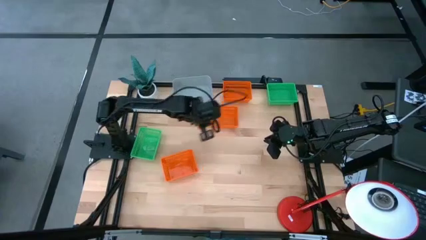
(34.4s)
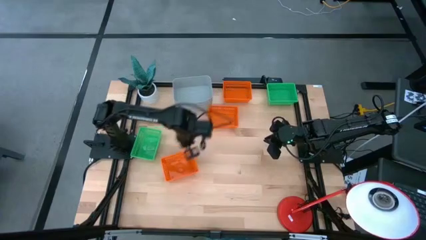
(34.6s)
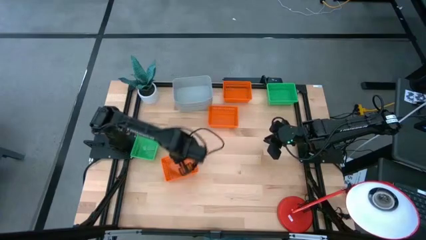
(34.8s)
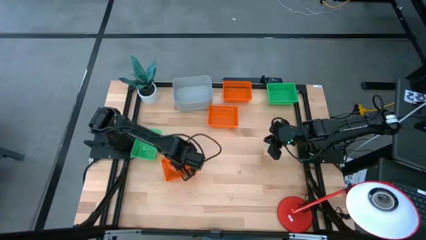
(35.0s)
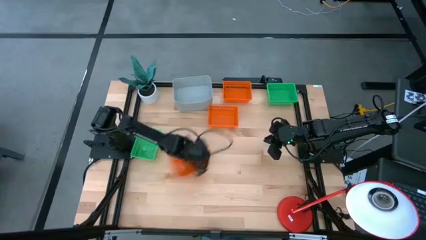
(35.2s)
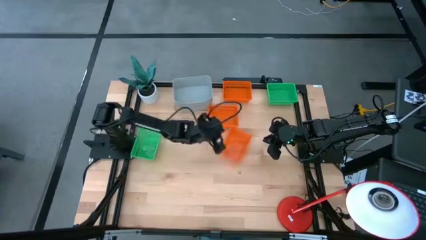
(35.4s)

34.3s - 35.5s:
Move the bottom orange bin to the center of the table

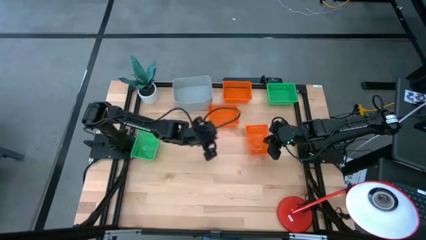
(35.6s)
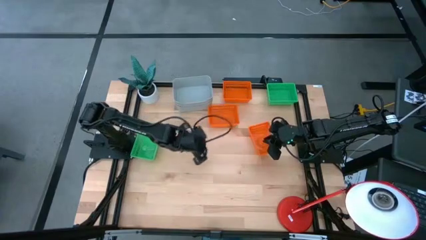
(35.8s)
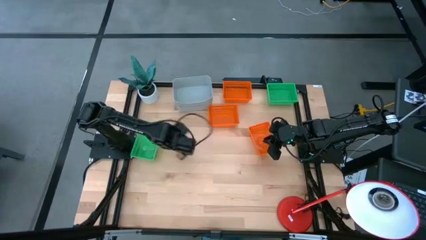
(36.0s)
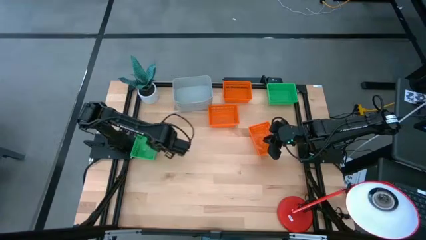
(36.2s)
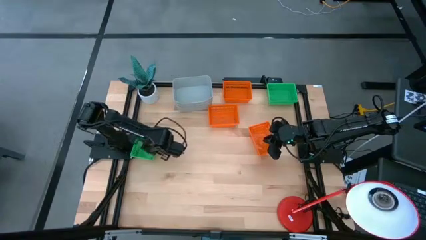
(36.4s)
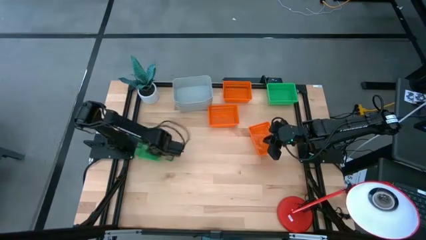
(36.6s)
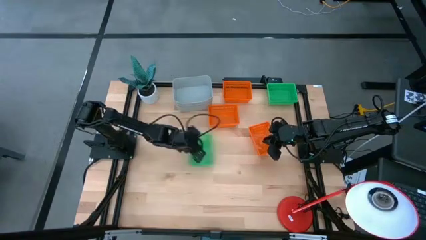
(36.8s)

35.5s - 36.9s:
Move the bottom green bin to the center of the table

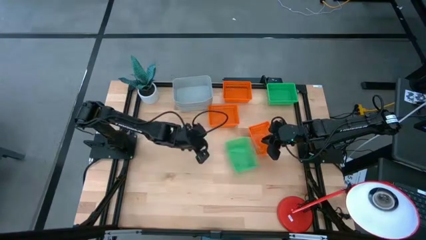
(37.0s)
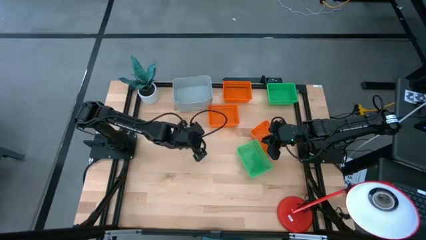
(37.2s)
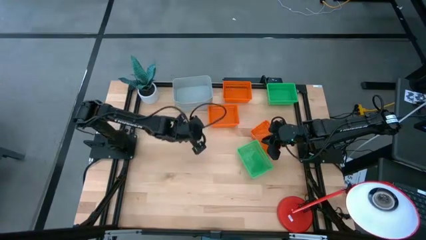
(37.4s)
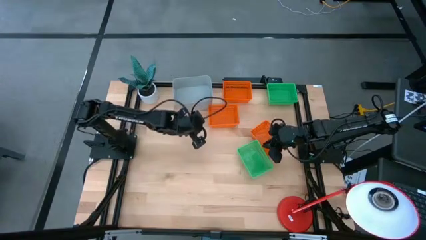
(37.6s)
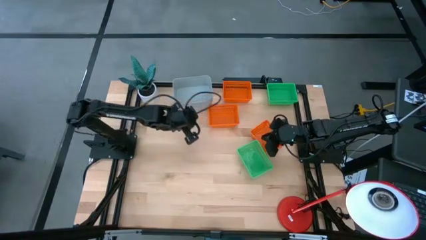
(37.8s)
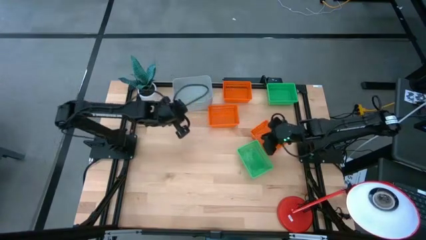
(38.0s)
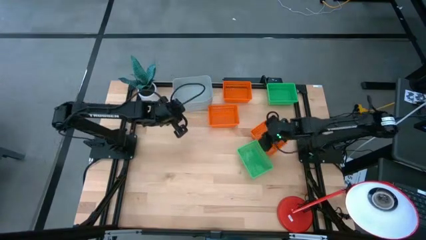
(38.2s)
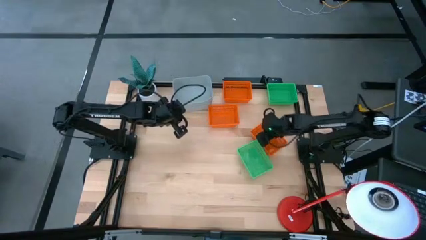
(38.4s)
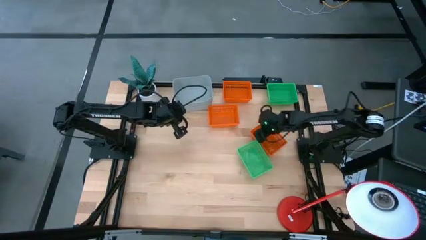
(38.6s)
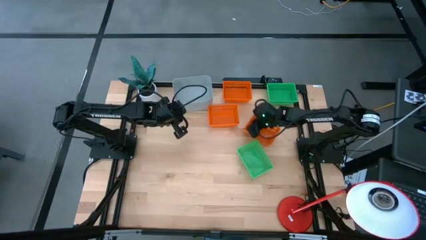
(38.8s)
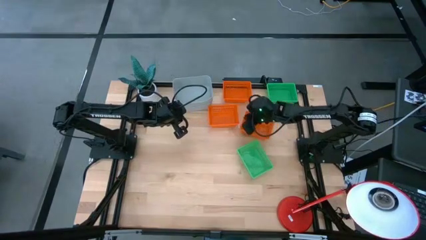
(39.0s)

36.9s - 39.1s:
Move the right orange bin to the center of the table

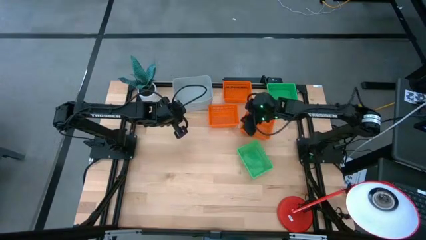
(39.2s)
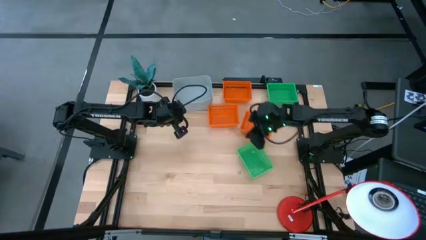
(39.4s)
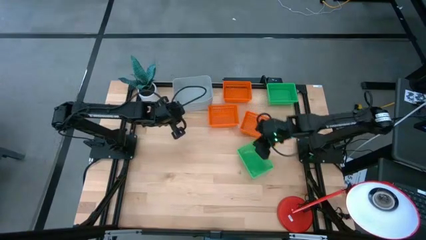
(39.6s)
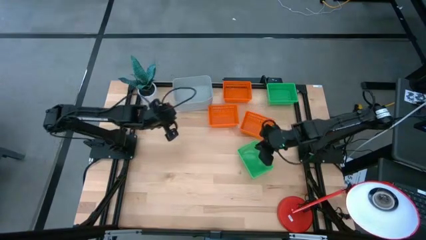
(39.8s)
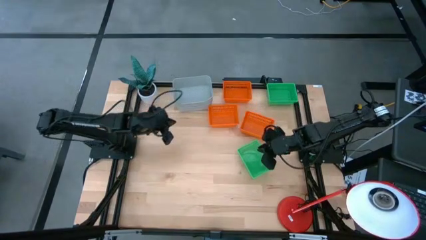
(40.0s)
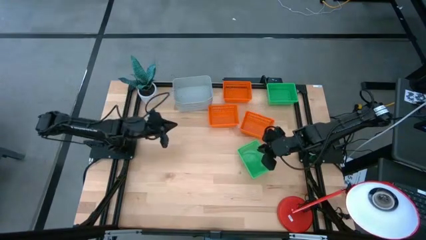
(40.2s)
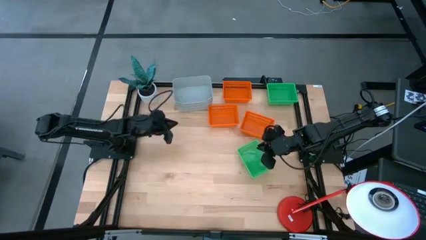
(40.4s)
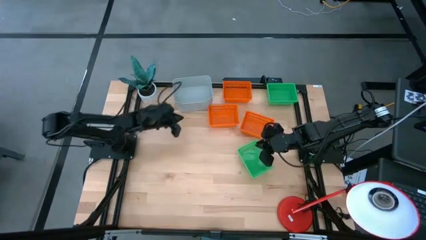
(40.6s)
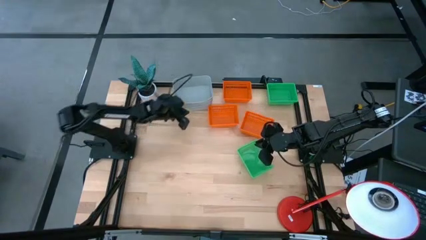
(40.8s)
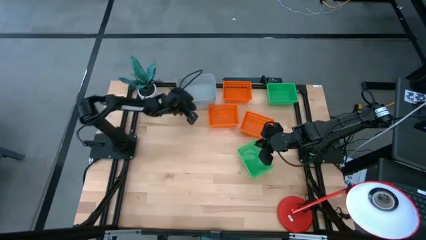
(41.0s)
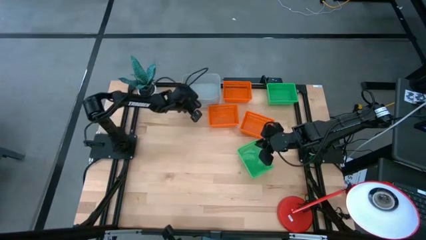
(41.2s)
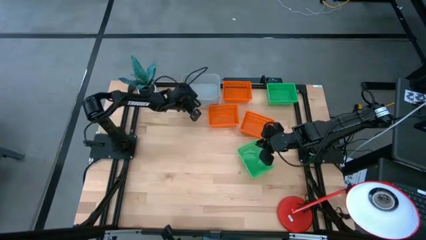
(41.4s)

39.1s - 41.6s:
Adjust the stacked gray bins

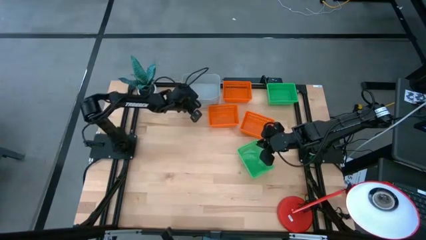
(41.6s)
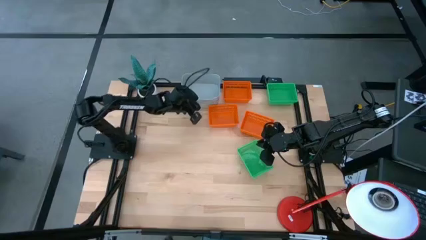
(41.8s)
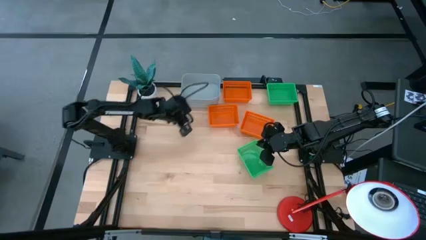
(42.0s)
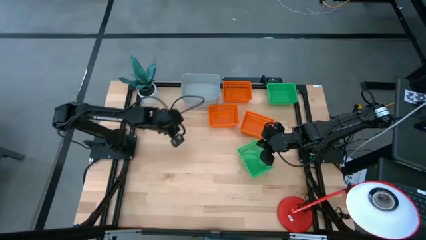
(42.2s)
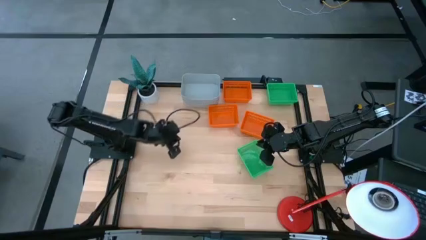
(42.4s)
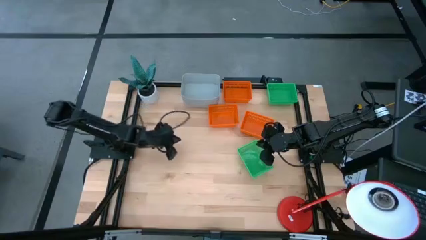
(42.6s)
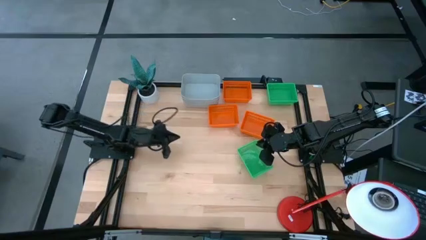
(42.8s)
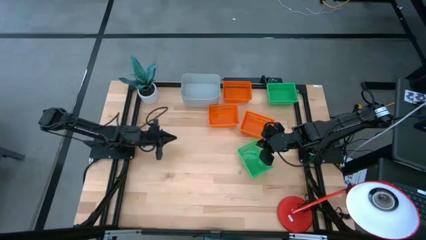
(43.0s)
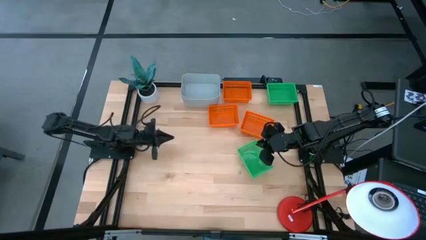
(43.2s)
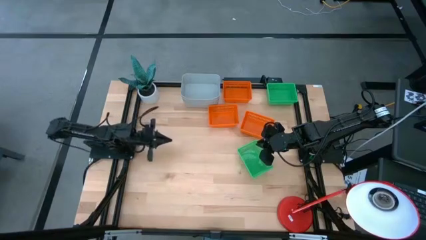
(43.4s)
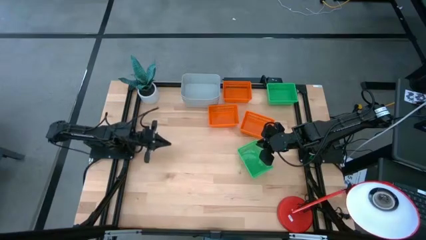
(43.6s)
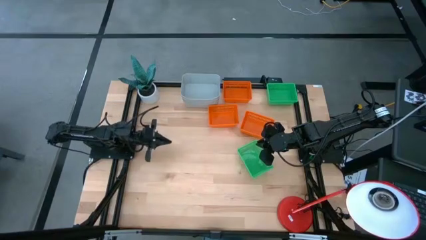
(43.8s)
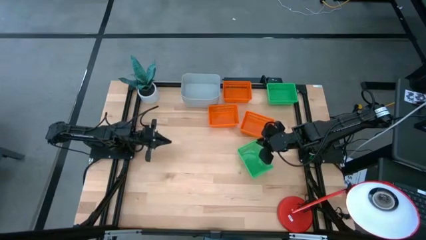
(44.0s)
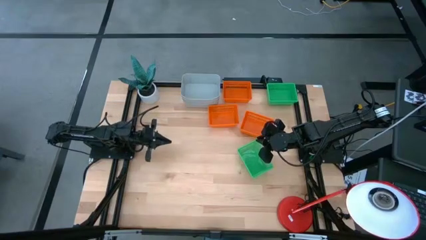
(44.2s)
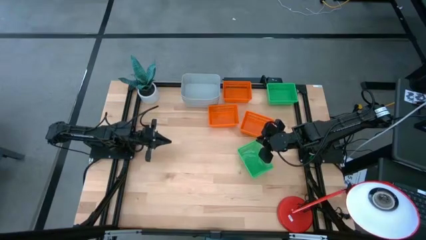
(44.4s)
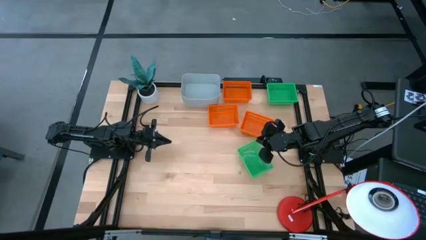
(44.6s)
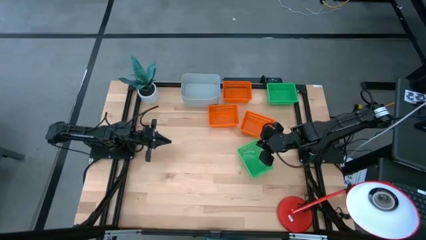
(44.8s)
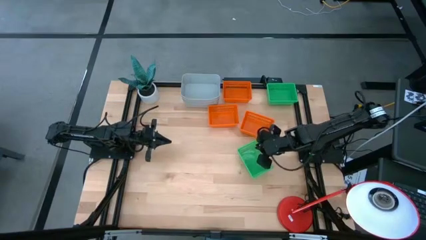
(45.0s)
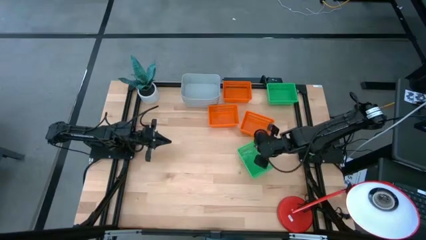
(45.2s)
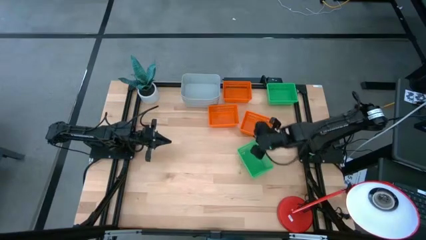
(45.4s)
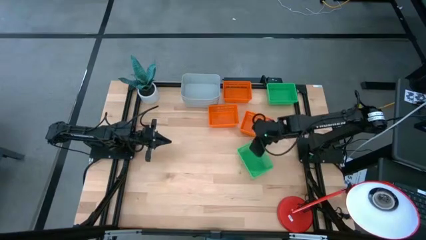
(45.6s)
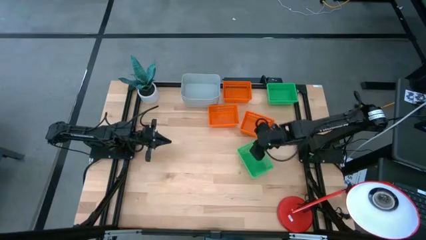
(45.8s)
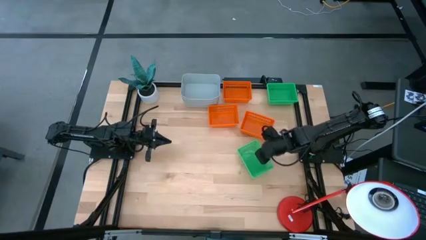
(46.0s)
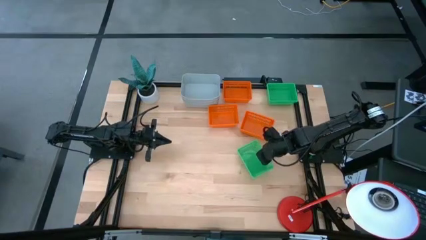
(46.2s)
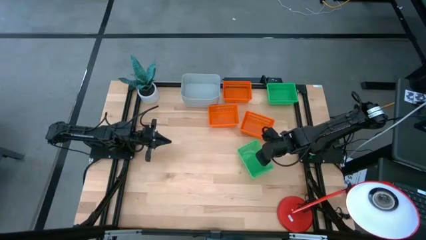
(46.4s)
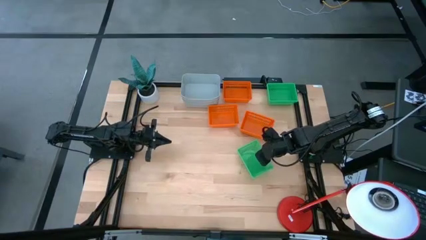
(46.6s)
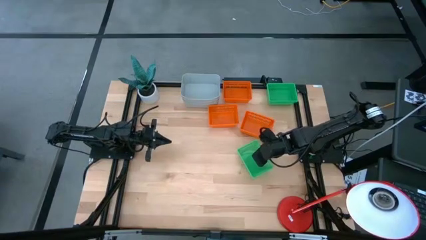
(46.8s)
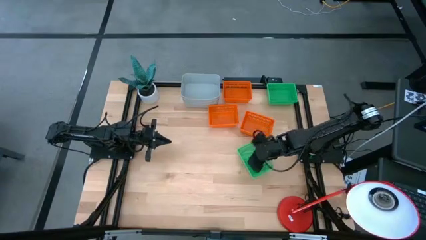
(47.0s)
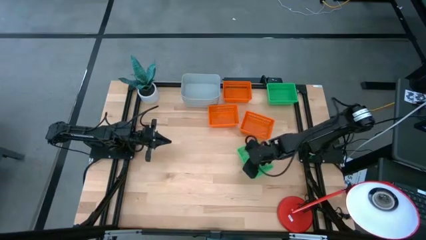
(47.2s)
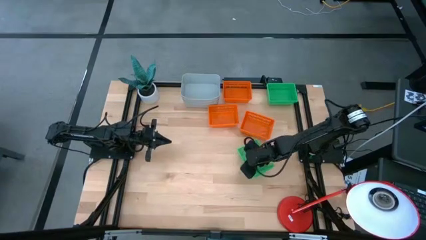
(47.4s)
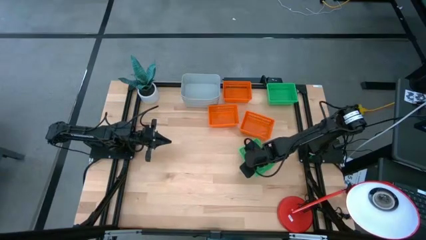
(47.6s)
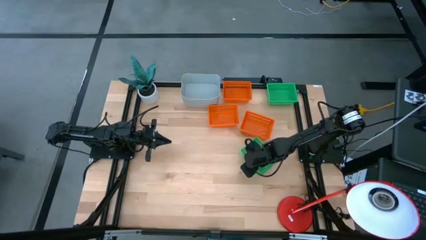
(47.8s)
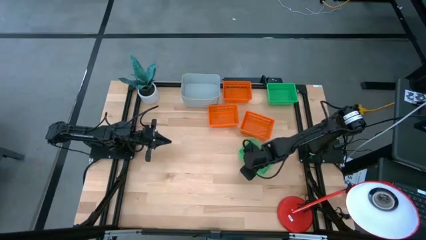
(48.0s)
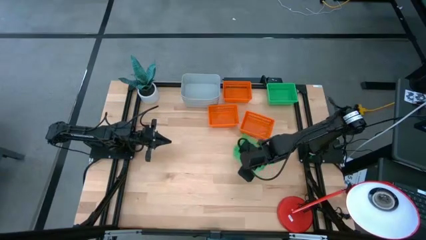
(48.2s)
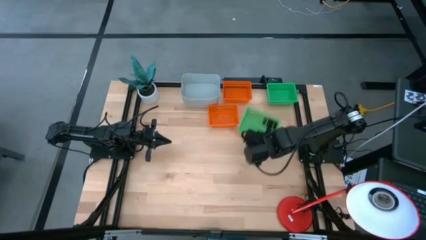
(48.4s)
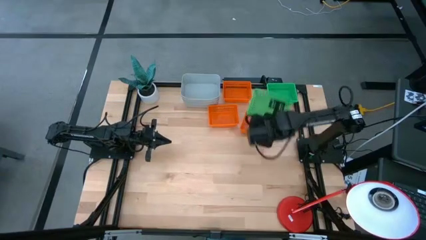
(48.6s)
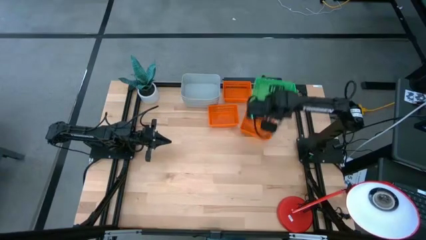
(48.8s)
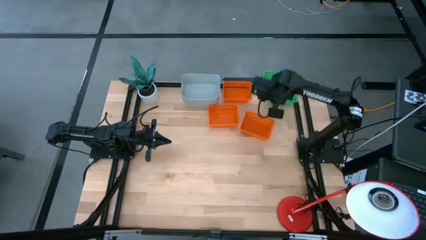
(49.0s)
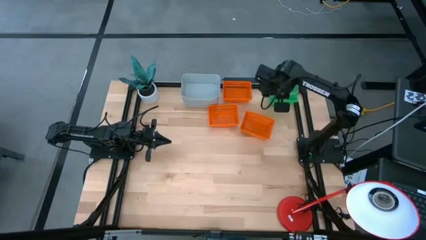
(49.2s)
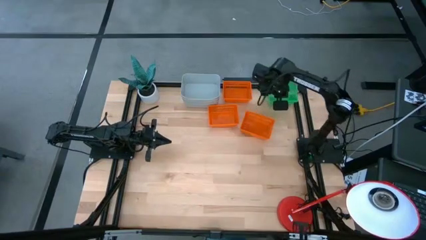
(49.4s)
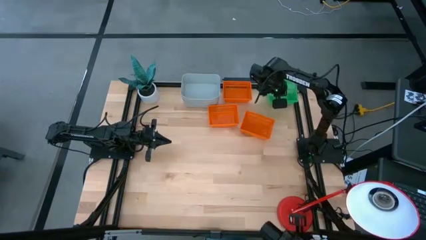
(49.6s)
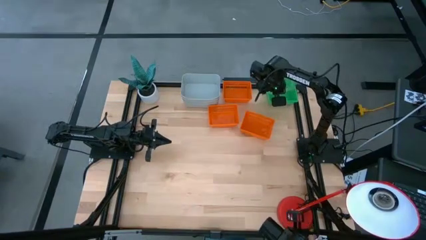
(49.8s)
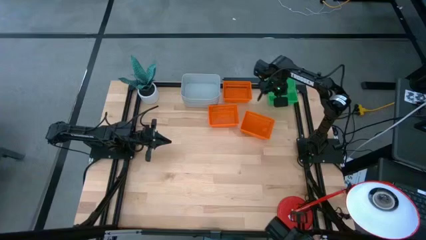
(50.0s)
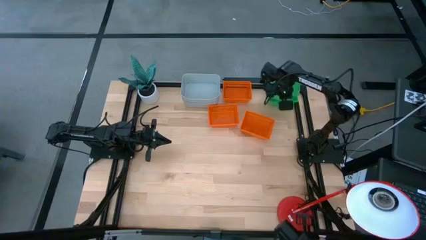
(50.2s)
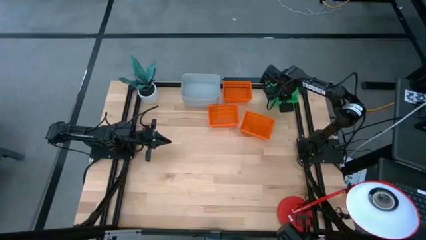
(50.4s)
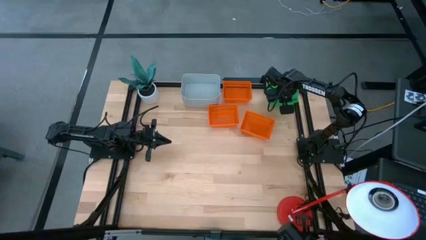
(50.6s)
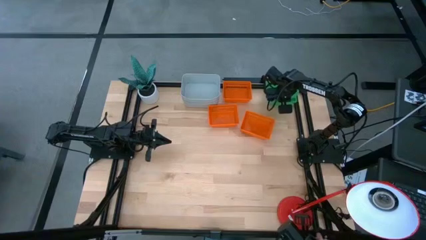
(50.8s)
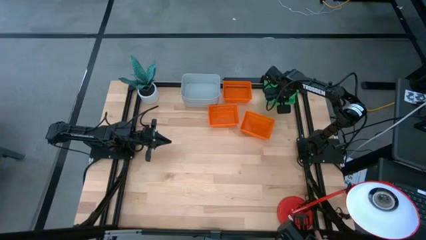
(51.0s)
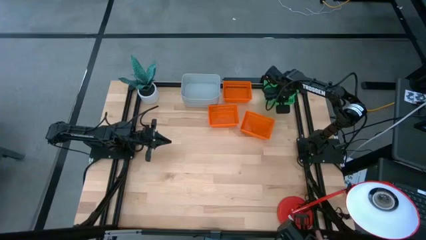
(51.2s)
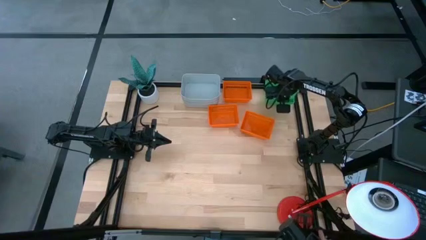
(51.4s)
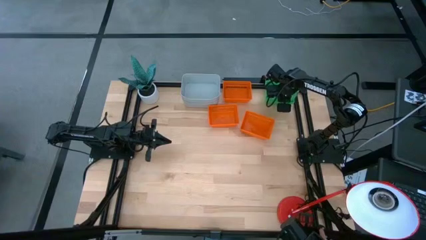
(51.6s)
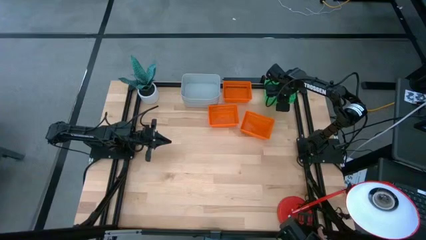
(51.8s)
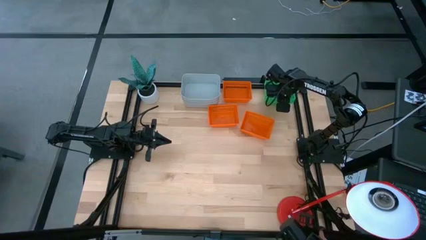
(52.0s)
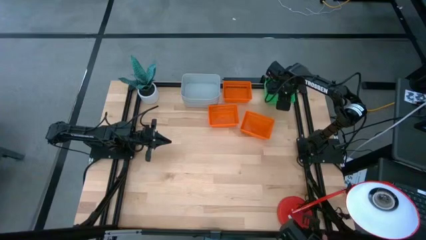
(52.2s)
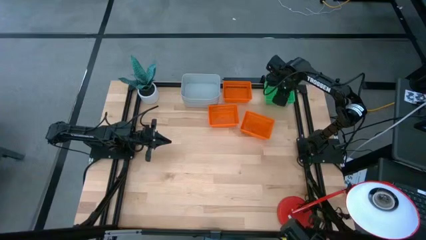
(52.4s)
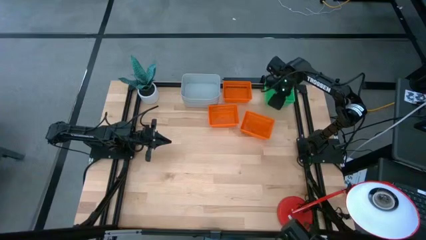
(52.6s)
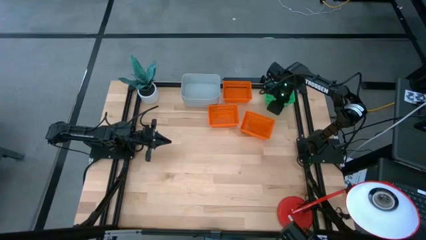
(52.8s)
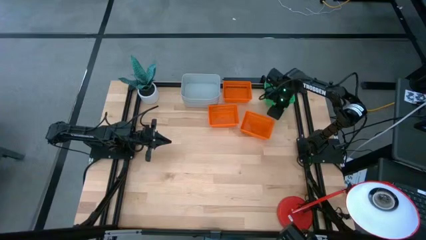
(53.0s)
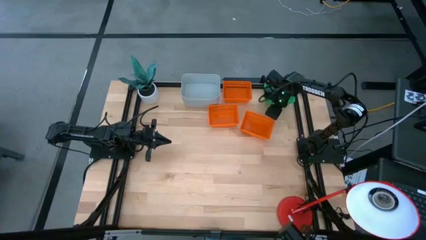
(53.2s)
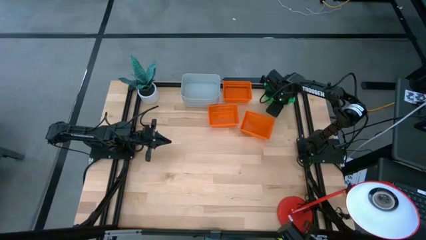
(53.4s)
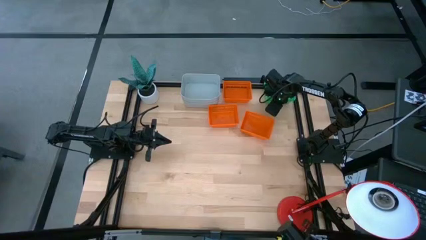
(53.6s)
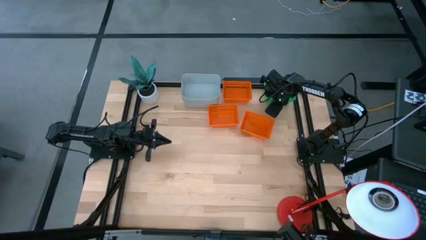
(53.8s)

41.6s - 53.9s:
Stack the green bin on the green bins
